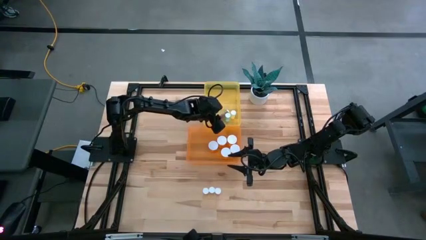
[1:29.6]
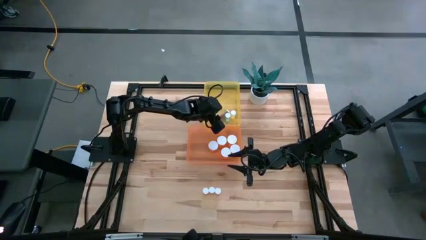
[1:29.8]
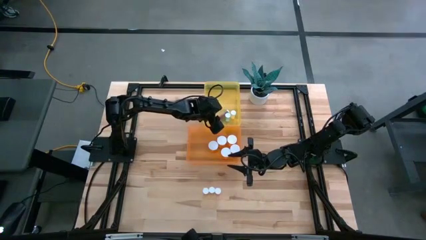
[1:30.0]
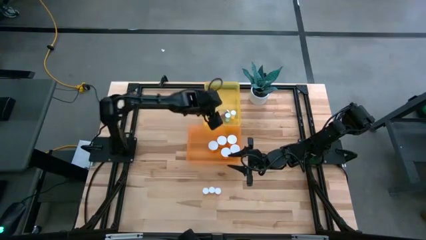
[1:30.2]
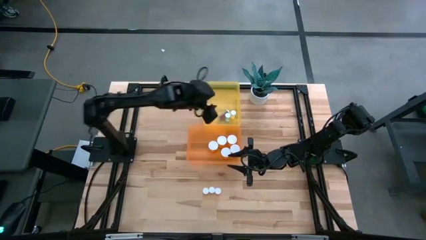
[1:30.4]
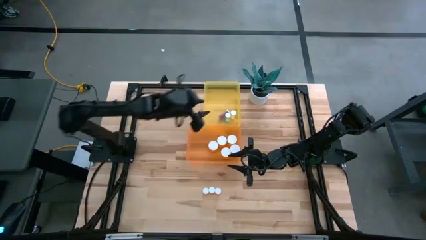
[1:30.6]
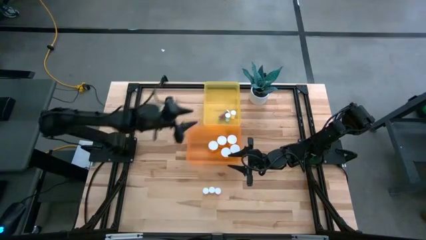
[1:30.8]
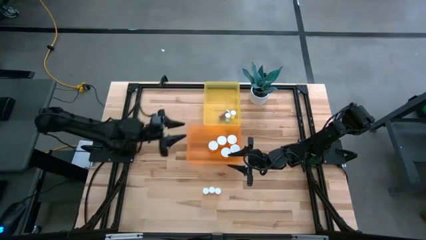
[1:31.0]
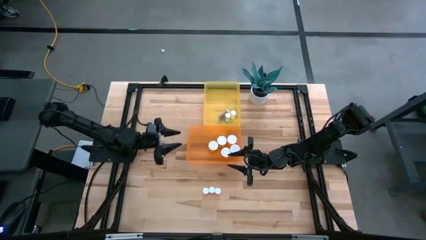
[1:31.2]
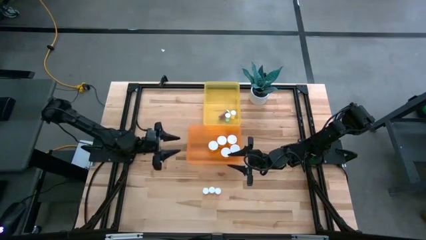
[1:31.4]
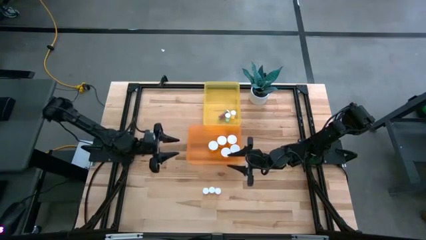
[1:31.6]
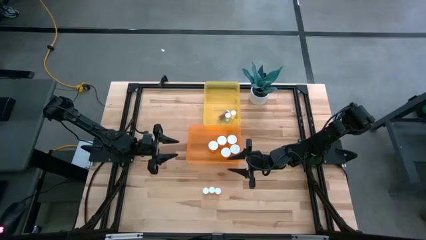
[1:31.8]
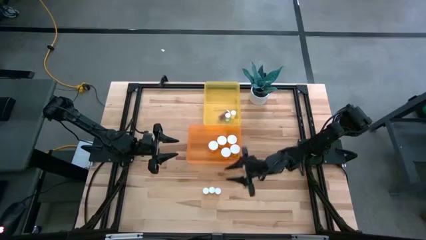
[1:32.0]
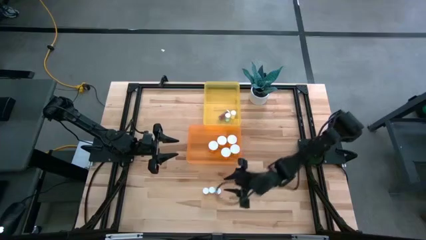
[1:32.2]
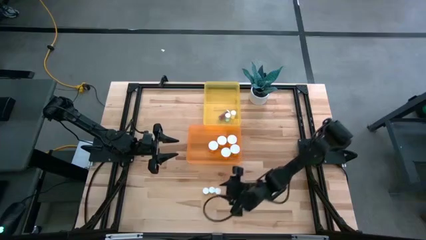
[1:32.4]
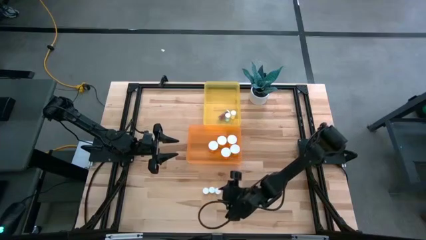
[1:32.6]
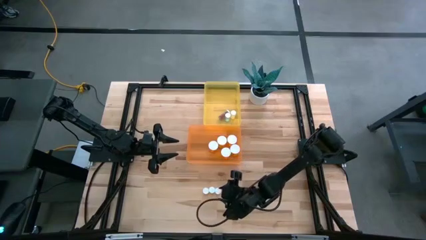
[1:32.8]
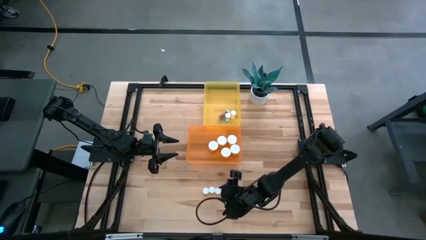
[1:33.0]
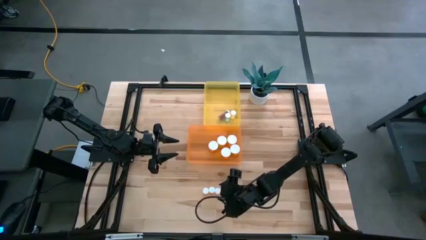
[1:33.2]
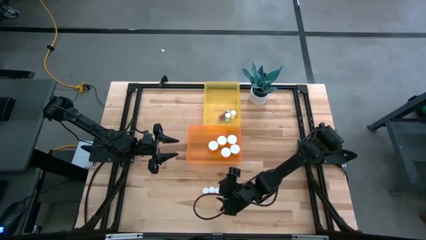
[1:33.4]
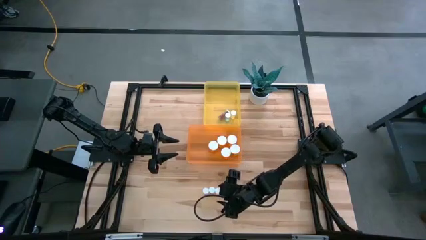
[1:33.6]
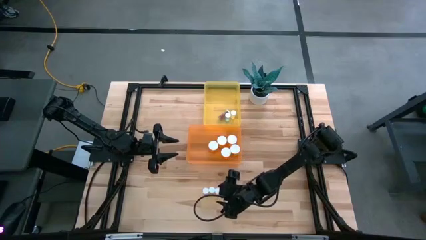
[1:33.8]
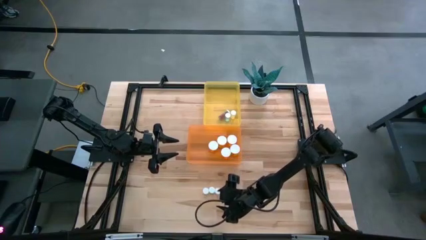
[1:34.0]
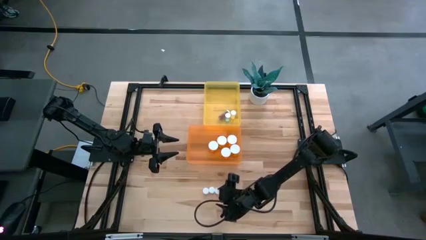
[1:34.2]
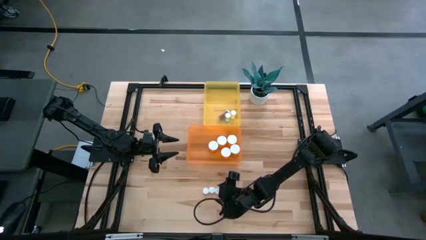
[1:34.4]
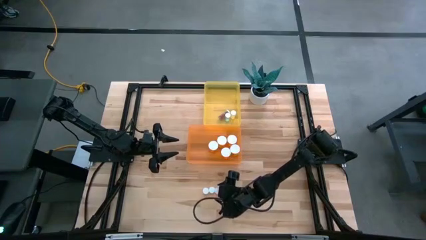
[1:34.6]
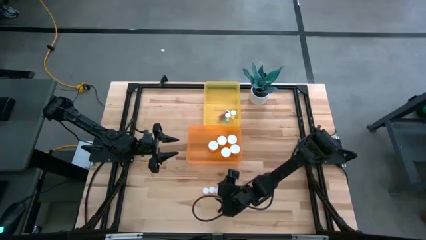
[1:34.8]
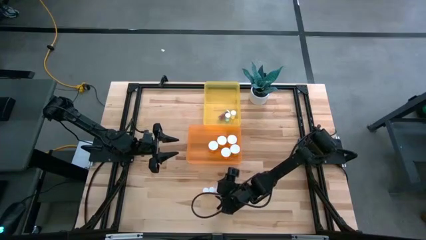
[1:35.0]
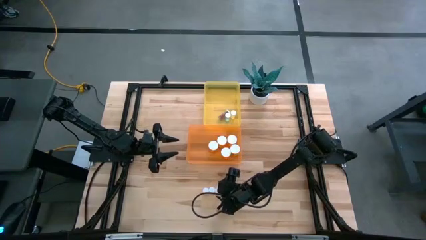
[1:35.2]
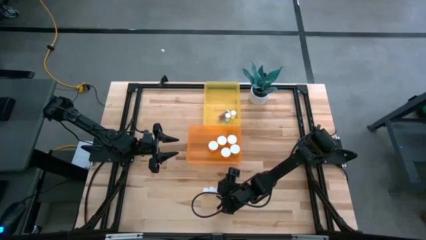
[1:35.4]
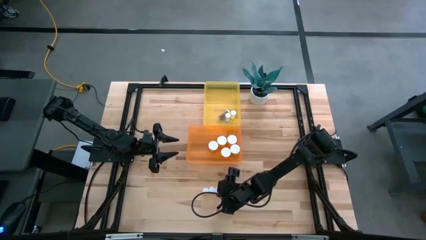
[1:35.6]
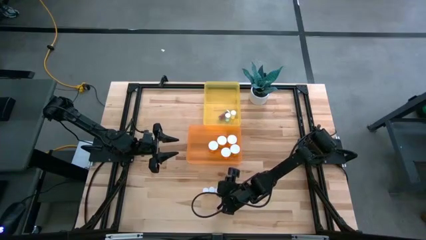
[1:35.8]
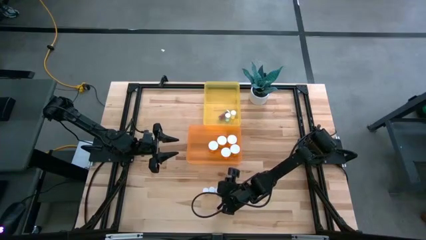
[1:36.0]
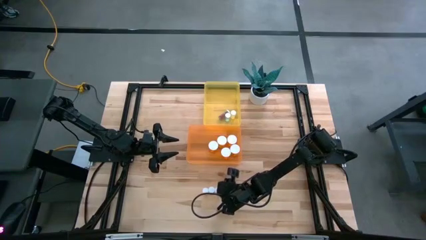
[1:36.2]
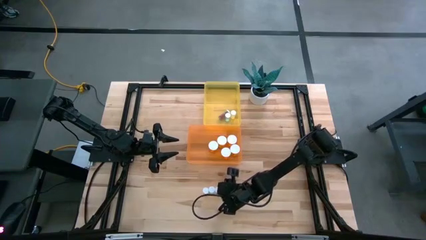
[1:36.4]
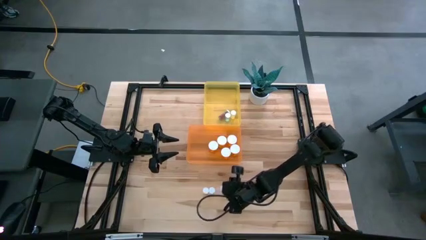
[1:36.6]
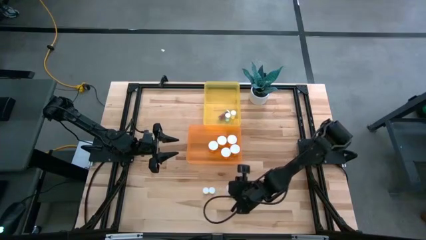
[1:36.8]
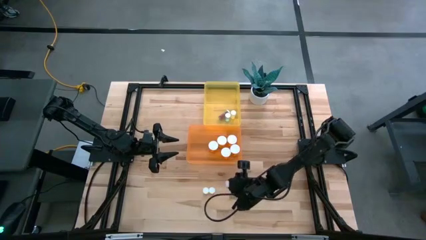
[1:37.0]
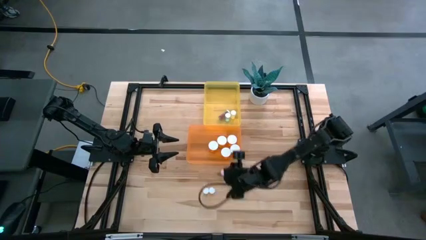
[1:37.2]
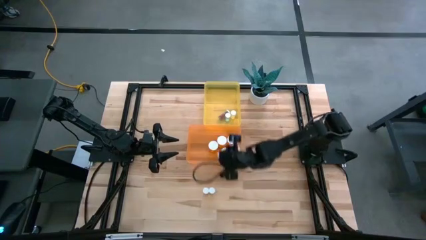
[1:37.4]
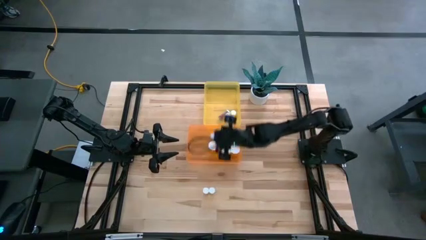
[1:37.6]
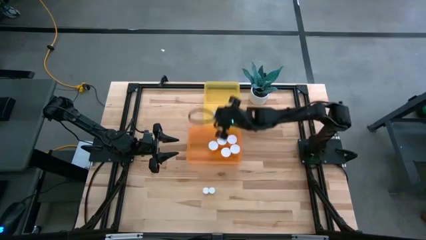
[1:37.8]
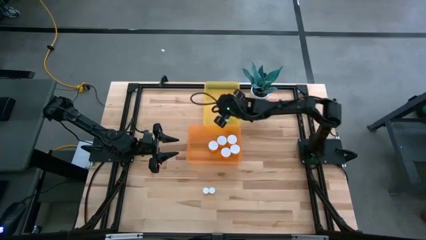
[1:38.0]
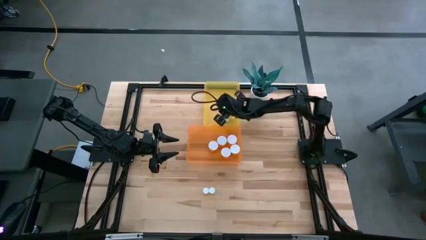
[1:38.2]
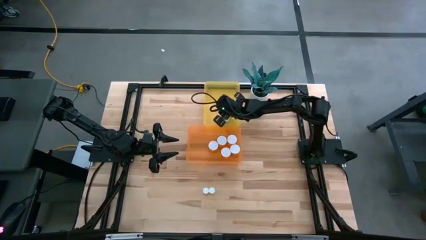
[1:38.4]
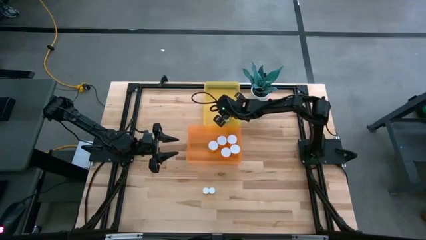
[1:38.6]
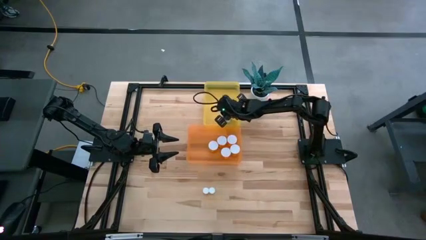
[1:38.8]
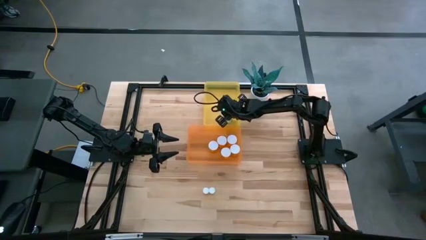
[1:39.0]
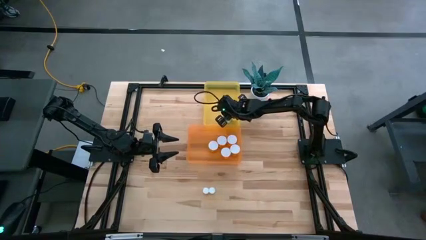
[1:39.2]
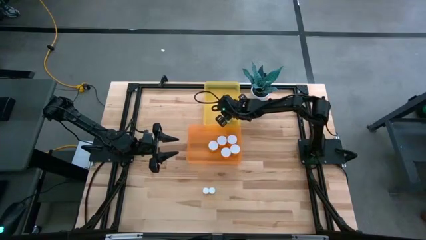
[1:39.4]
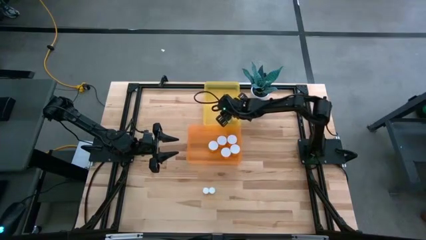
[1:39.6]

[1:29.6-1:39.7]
Task: Pick and place medicine bottles into bin by pill shape (circle, oval)
Put the small pink pill bottle into the yellow bin
